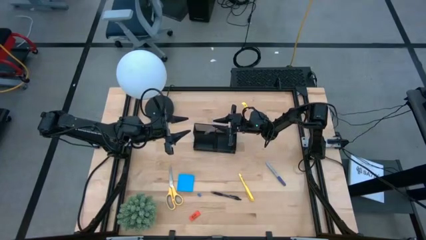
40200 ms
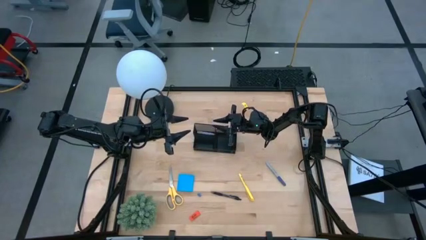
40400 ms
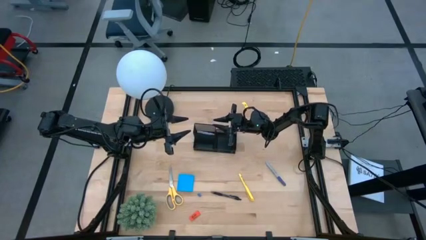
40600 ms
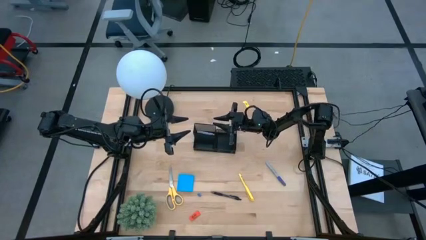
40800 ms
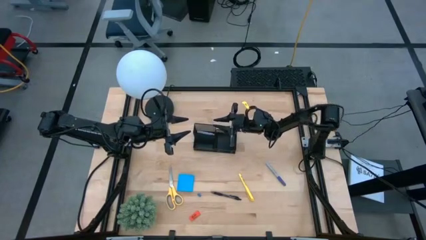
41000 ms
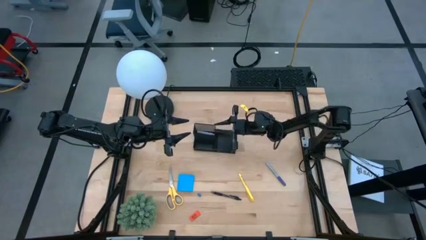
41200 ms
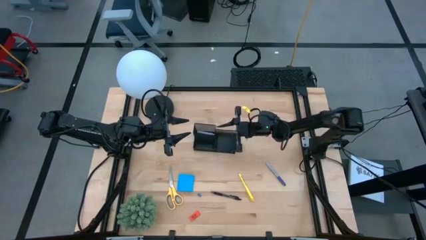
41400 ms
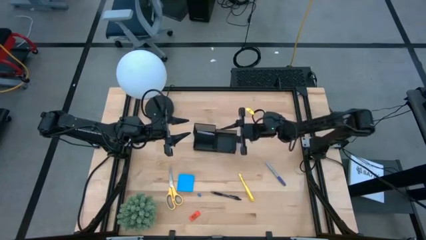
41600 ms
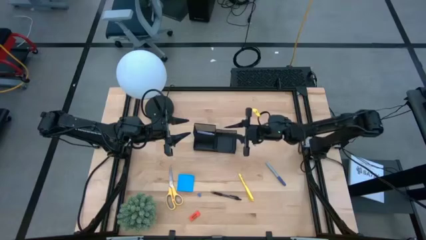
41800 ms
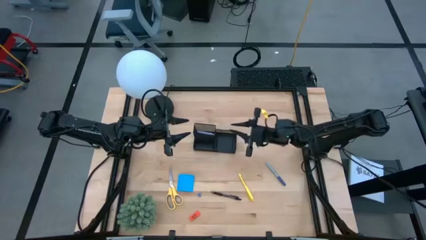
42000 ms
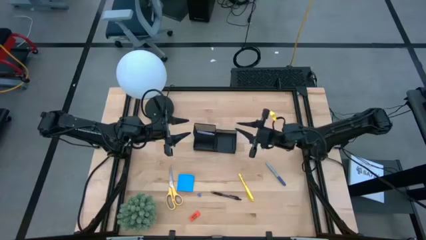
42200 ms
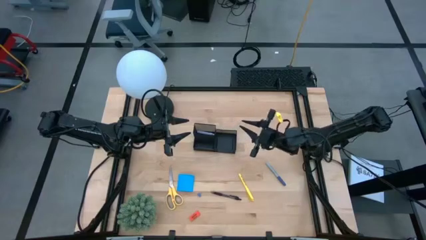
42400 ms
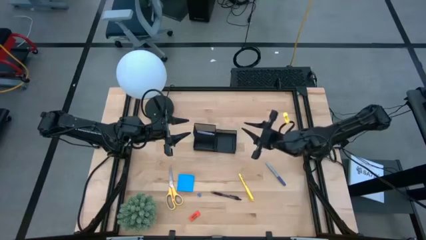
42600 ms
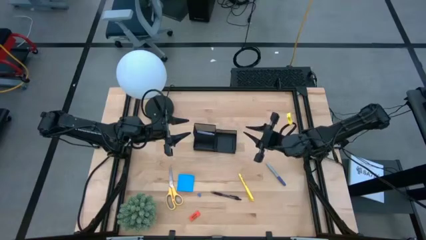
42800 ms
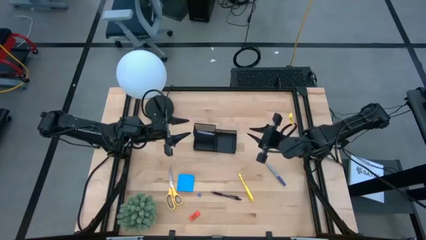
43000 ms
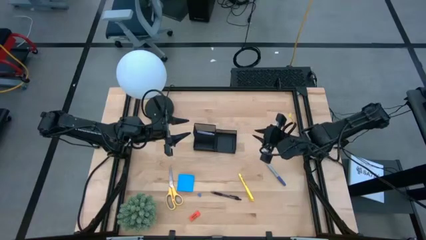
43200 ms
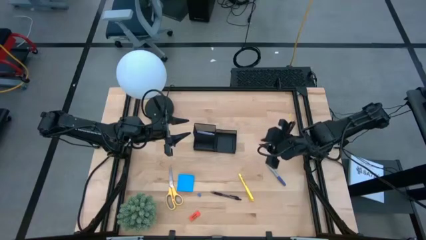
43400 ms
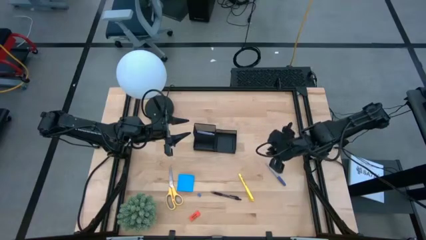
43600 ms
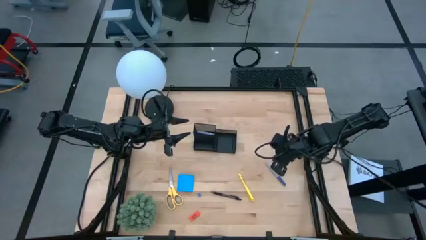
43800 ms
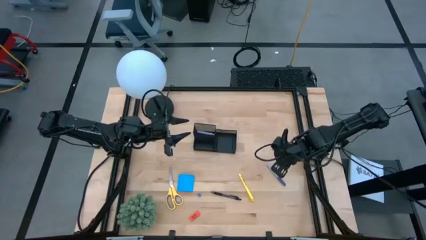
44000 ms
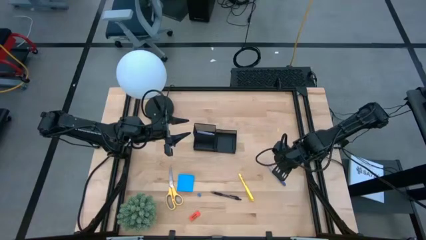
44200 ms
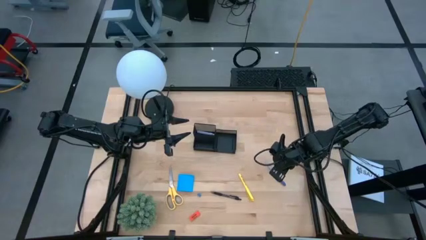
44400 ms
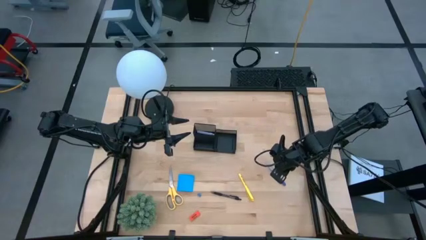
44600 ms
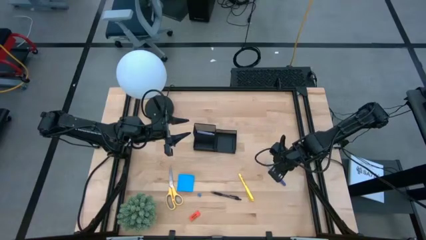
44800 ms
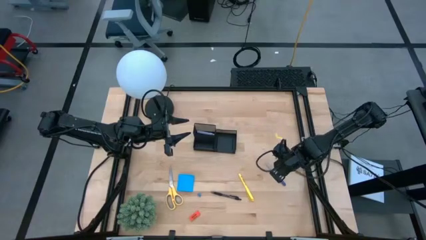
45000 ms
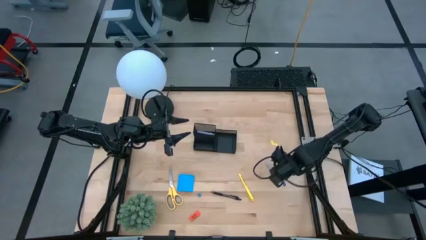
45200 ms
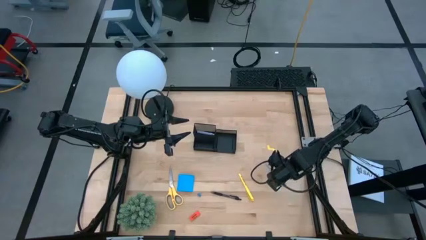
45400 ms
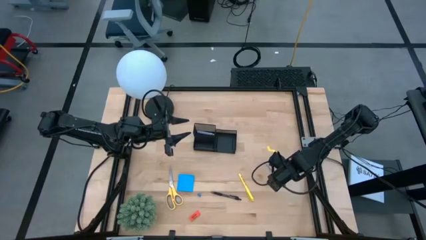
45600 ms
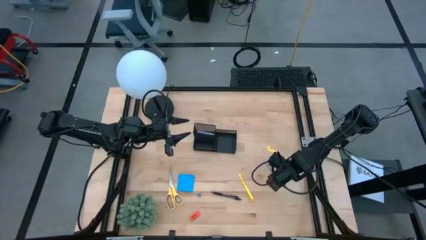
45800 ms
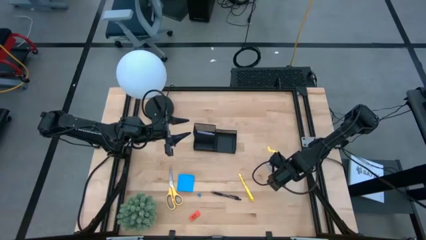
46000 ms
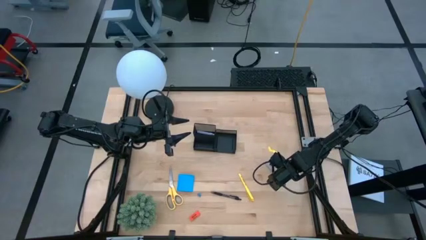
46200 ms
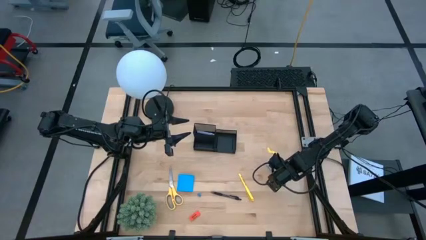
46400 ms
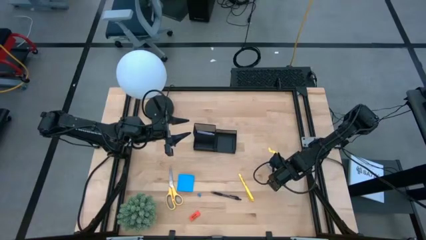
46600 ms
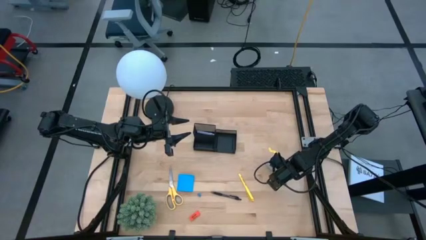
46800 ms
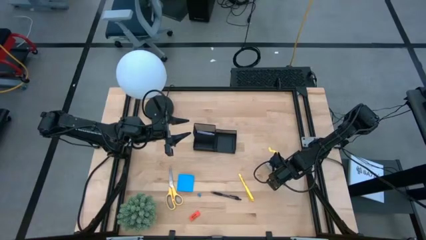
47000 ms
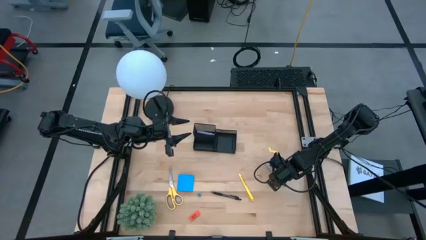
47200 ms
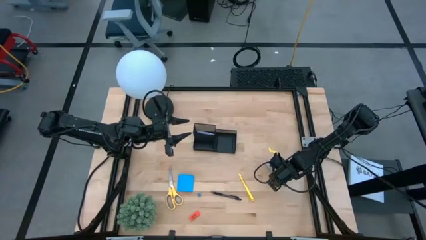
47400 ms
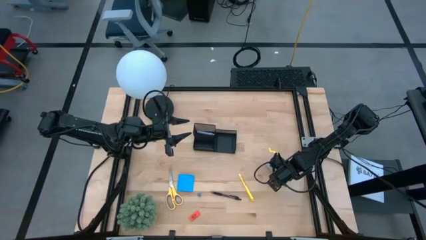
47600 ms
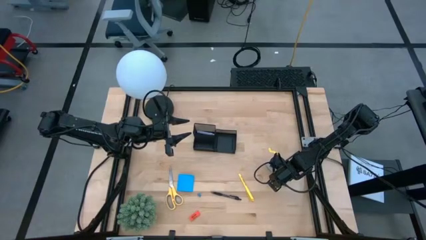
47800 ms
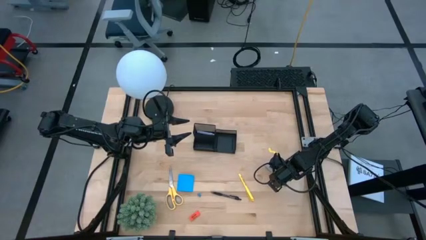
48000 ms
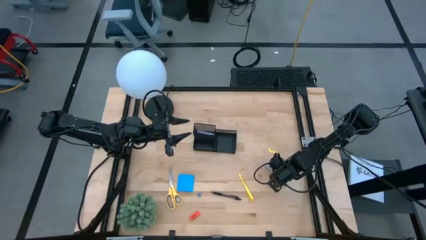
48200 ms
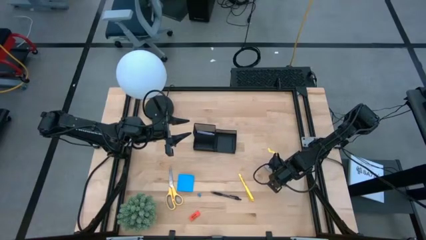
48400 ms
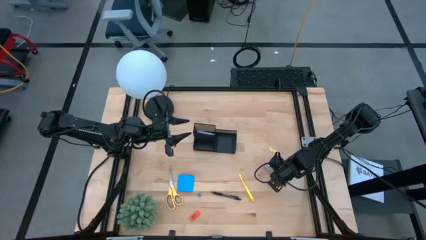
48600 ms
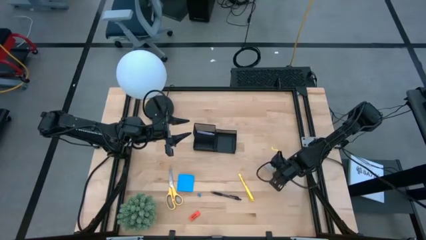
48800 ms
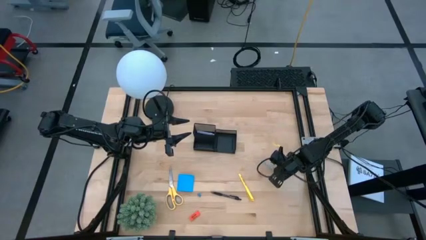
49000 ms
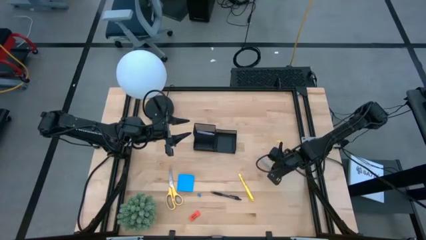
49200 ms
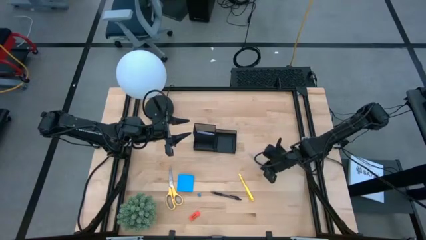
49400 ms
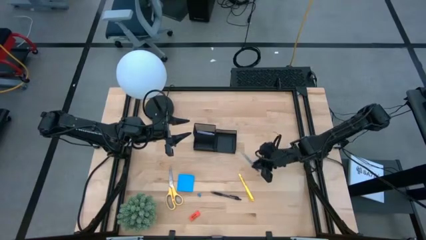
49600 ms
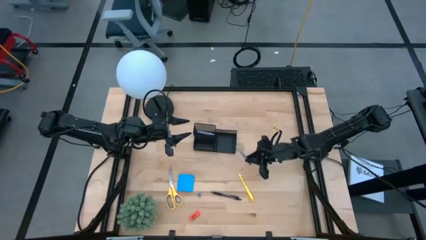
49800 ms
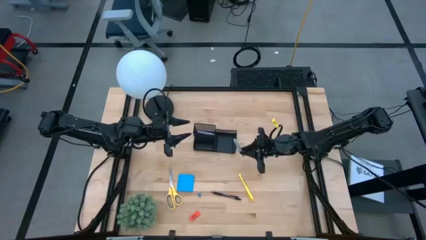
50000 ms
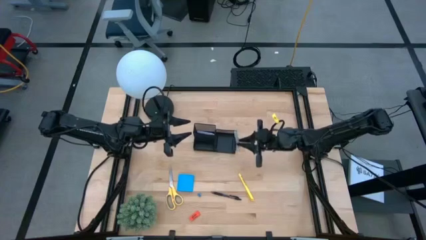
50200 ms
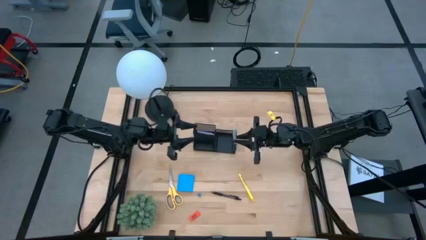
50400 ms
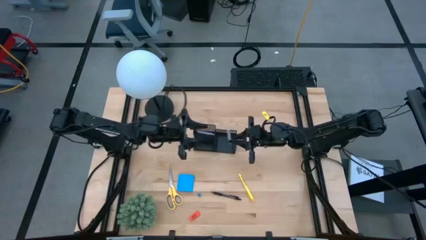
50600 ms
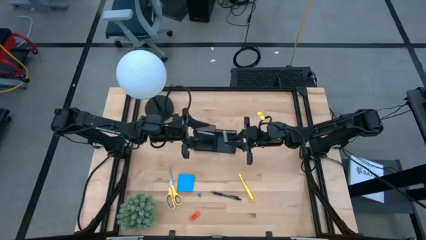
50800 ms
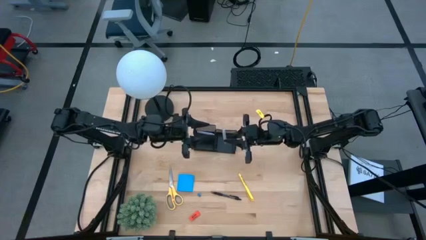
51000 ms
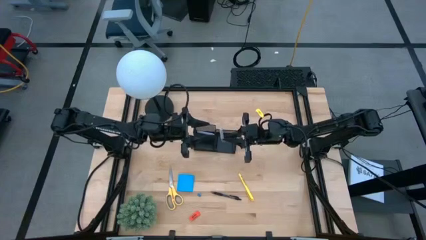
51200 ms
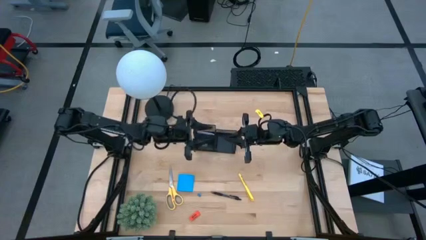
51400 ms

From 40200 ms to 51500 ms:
Task: Pick and place office supplies into organizer
Put the blue marker pen into the black desk organizer
